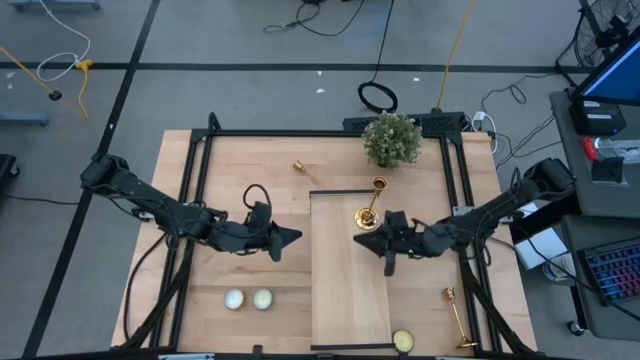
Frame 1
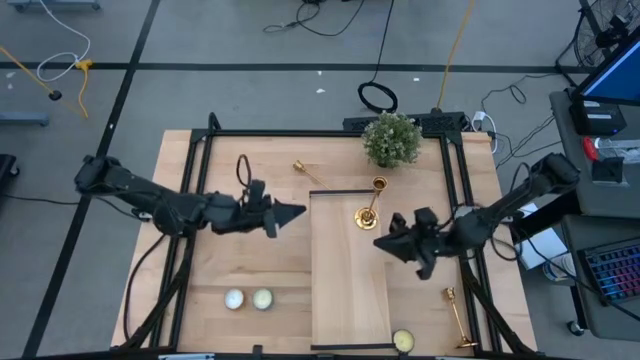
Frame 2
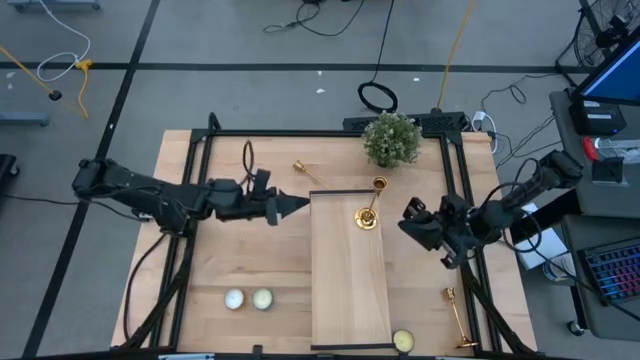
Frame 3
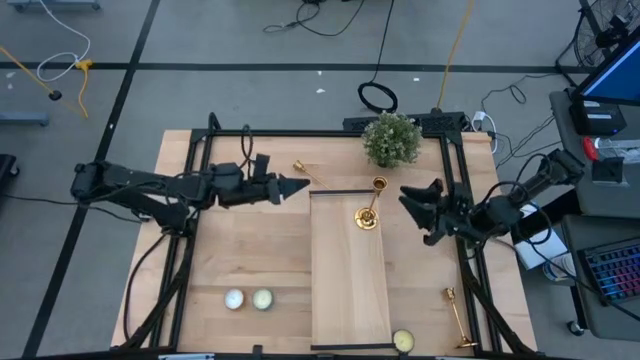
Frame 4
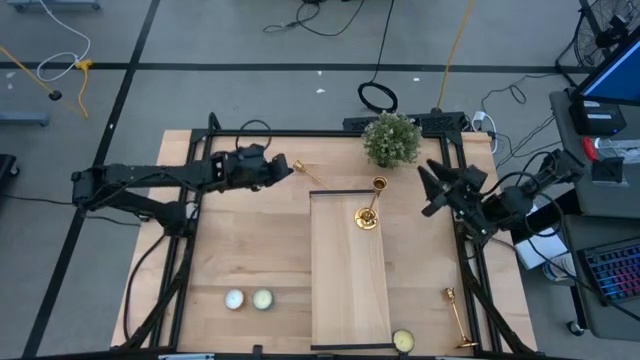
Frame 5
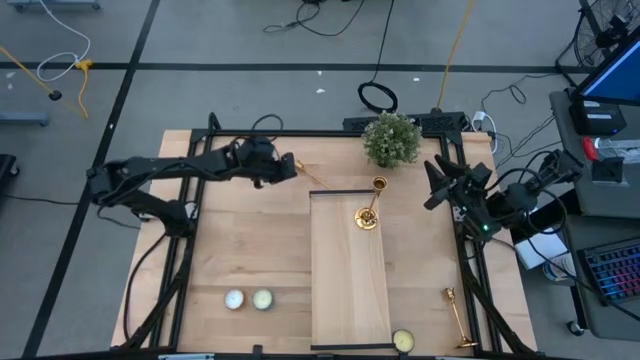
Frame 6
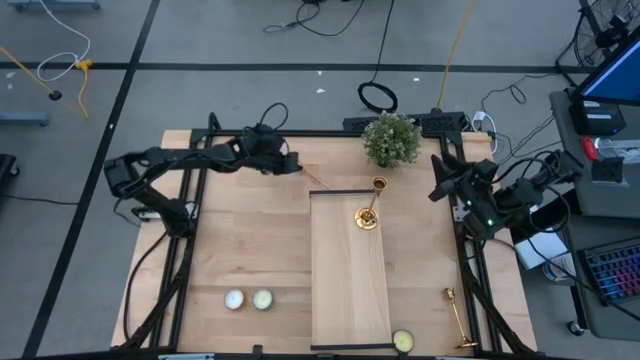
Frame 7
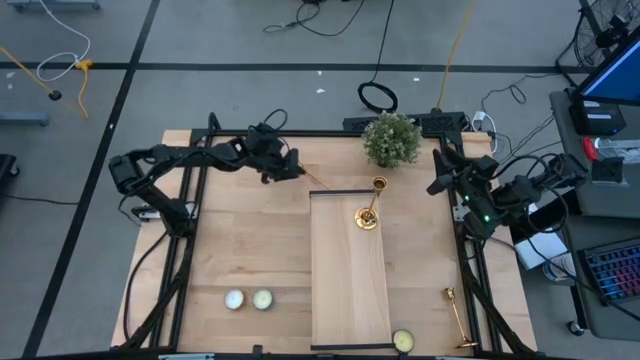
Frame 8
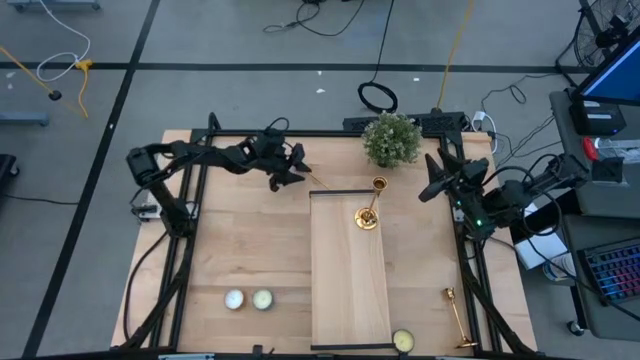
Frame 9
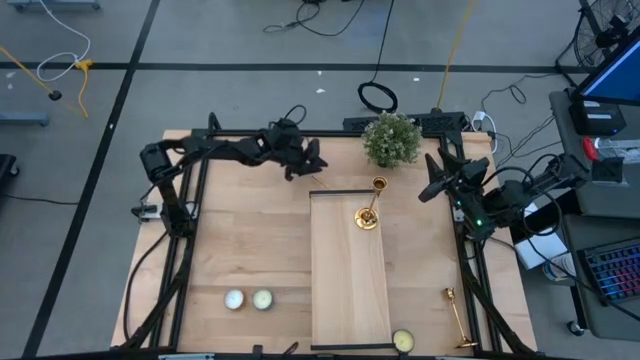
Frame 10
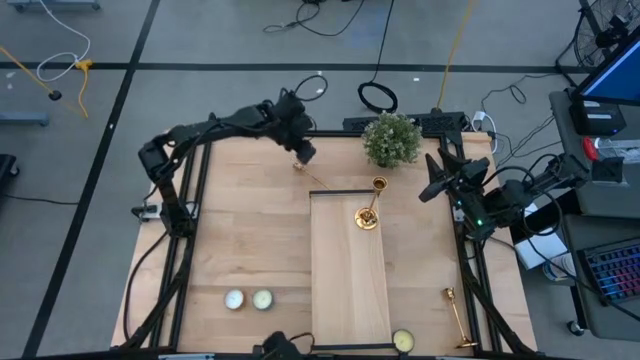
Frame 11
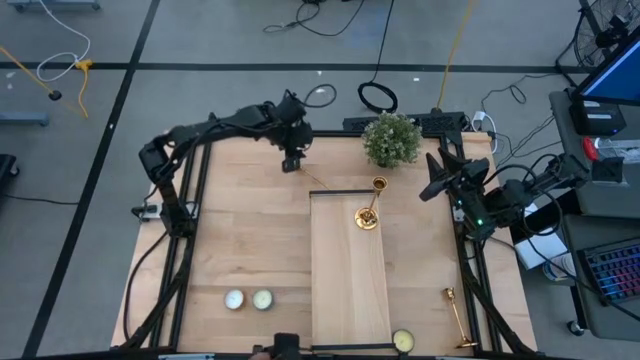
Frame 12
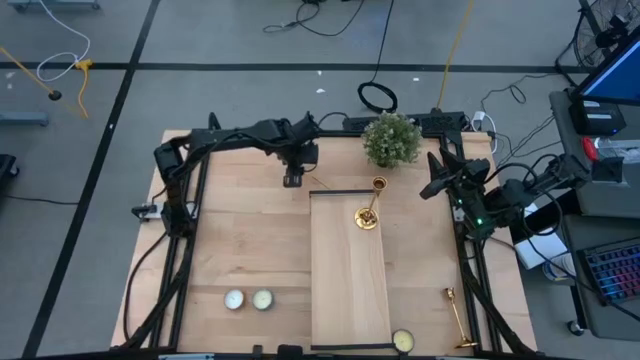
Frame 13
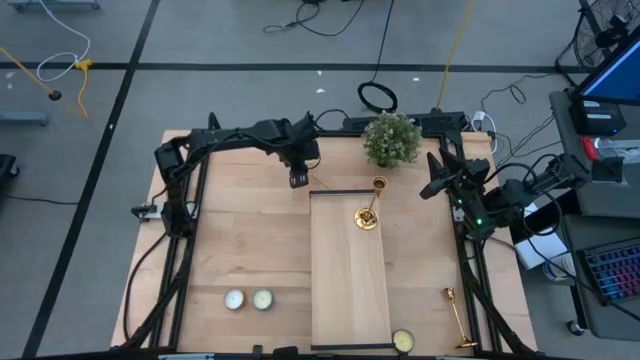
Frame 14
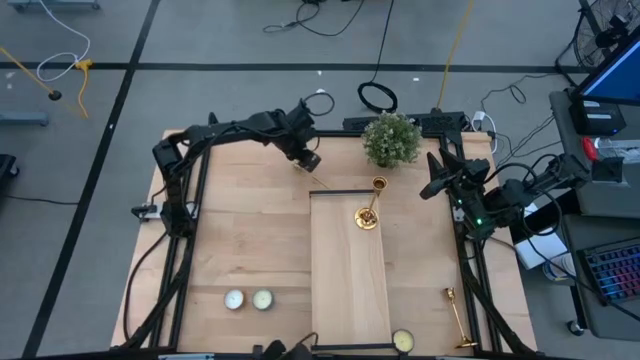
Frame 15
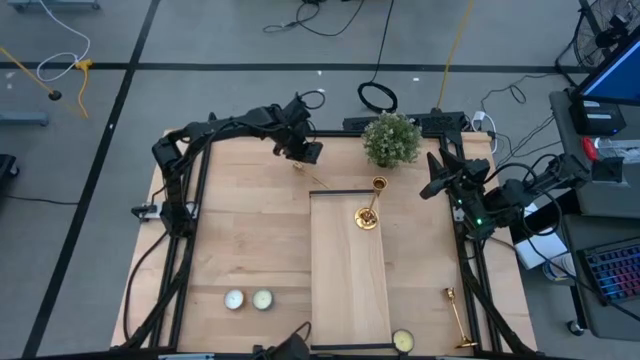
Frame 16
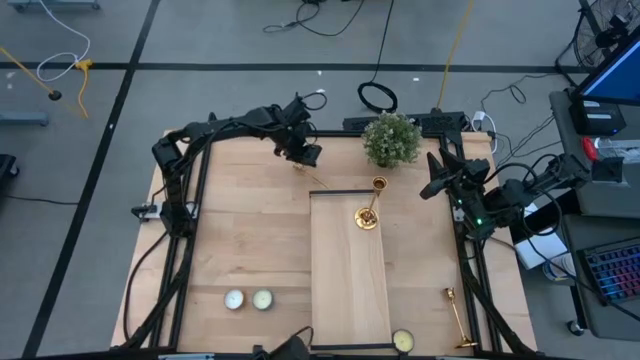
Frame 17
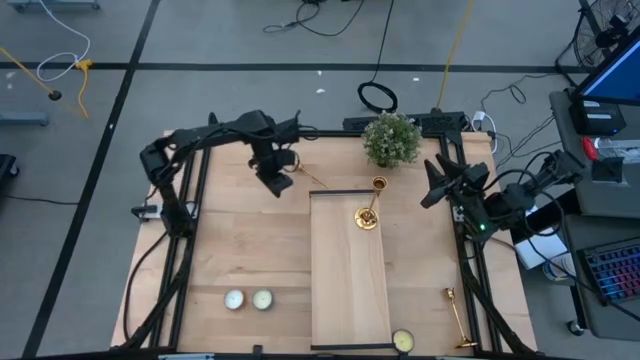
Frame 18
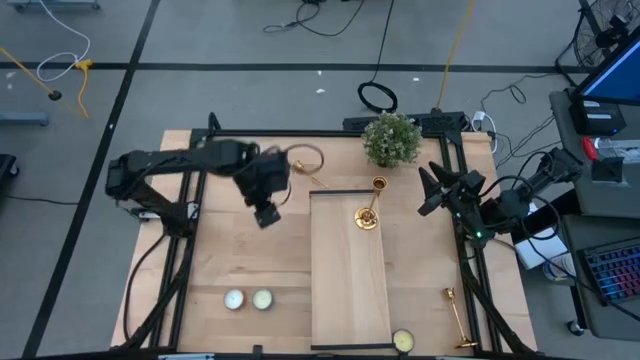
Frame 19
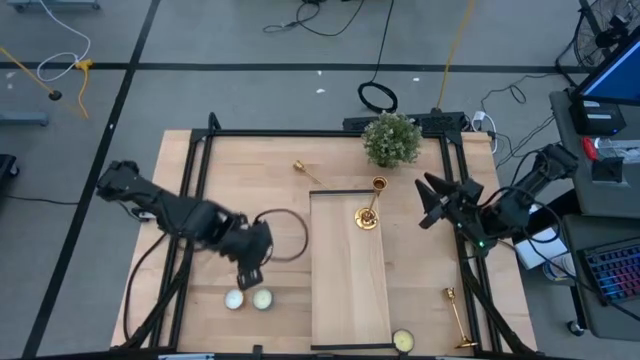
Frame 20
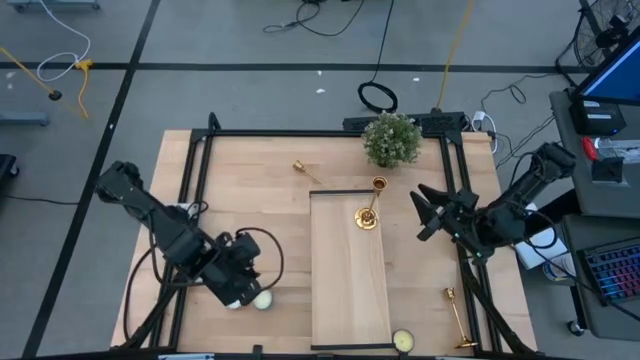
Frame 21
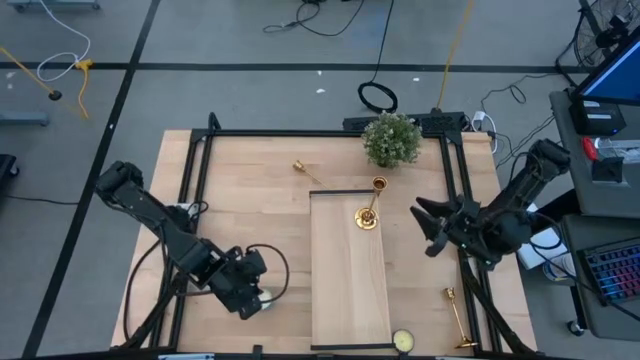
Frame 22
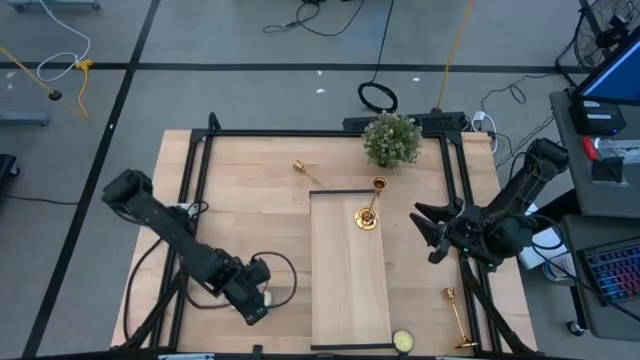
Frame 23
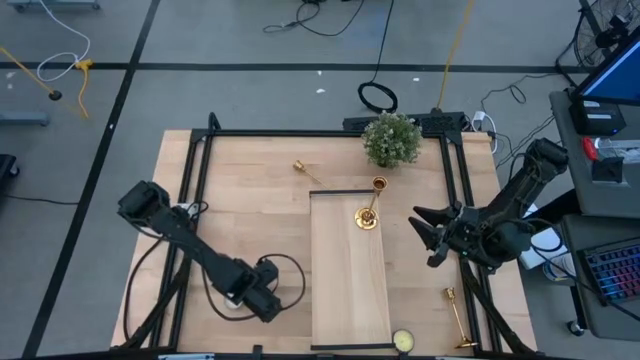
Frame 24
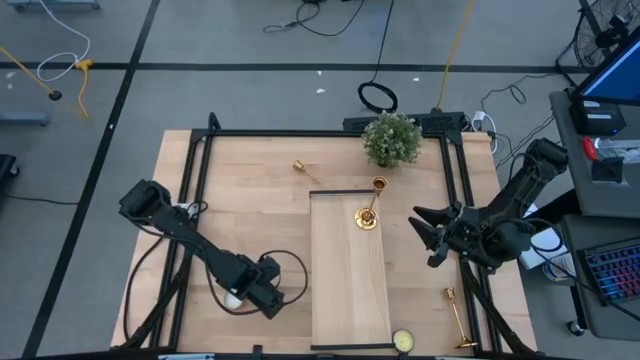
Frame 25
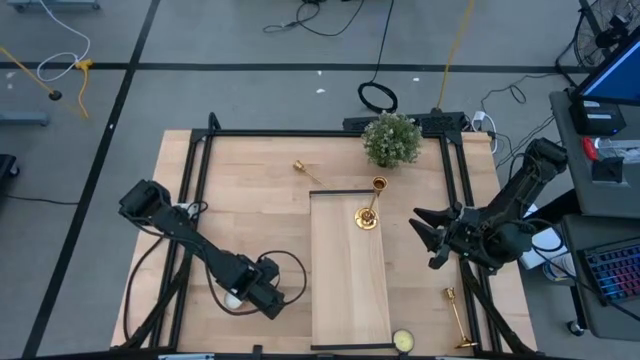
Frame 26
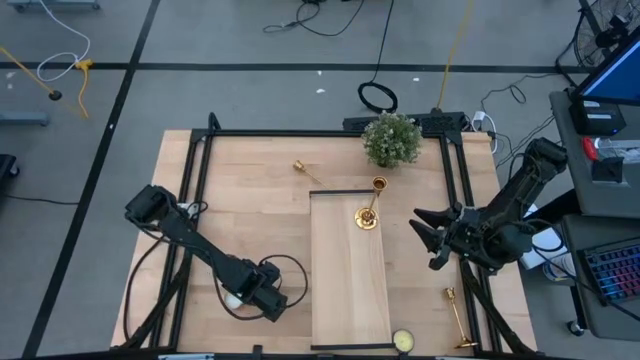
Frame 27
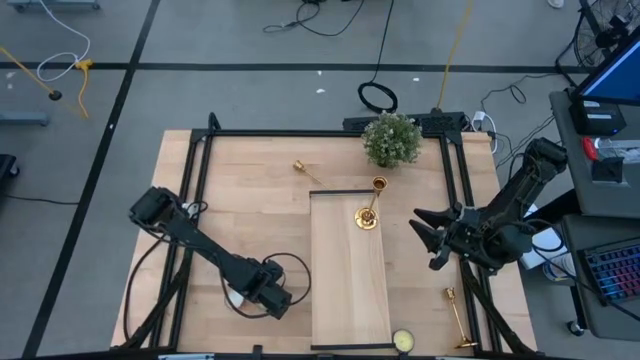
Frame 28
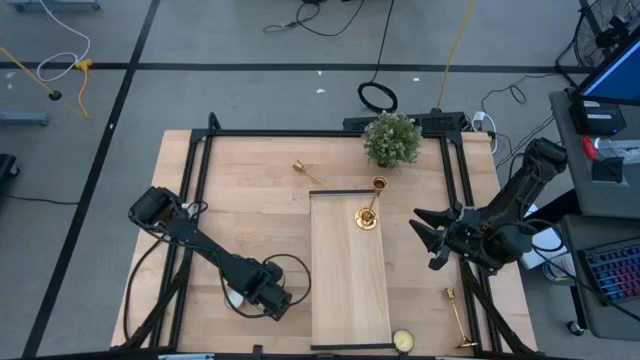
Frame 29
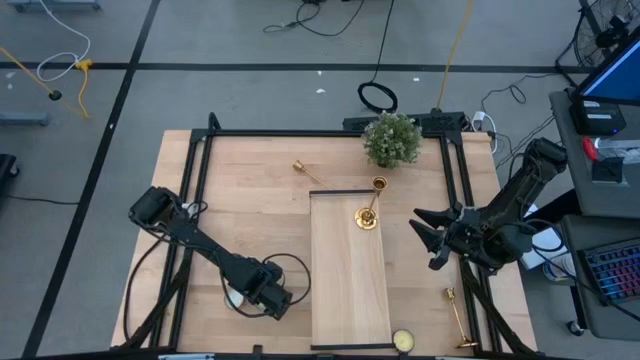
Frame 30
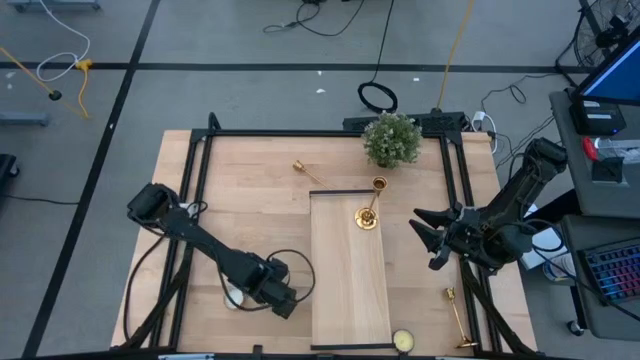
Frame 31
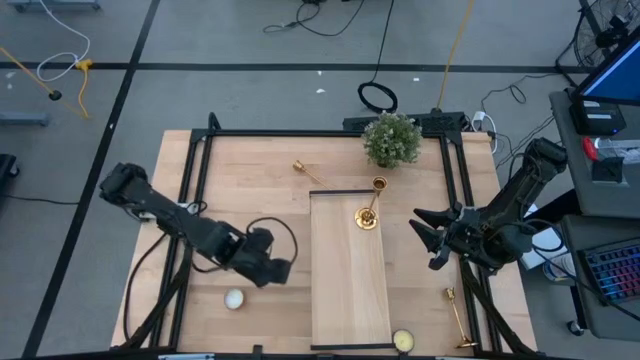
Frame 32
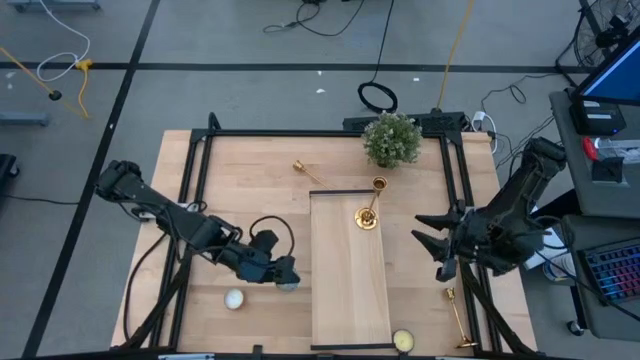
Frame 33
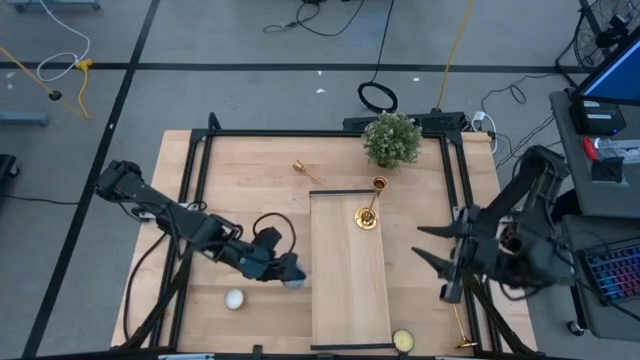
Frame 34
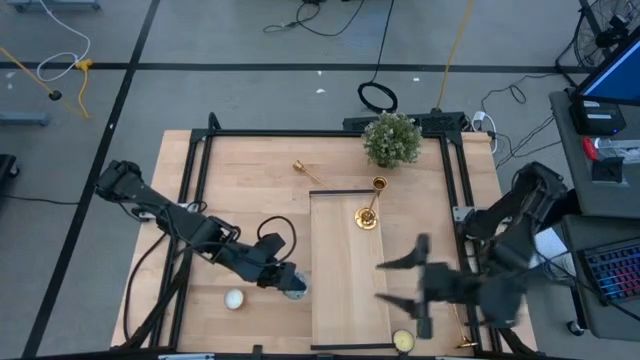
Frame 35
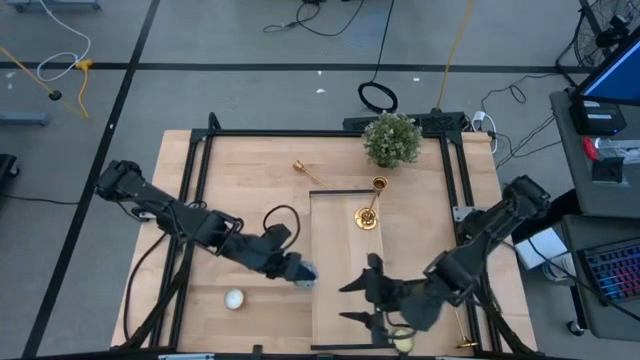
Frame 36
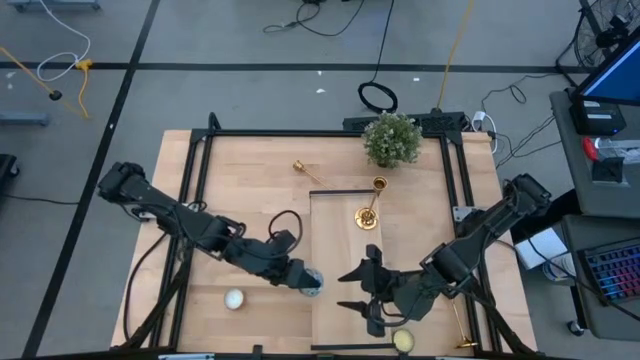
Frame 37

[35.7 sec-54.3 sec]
Task: Pick & Place candle stick holders
Put the blue patterned scented candle on the shelf

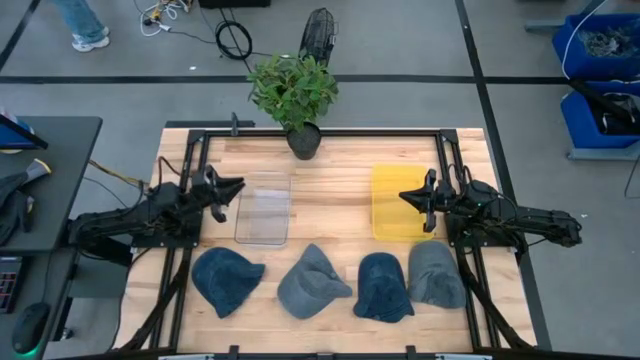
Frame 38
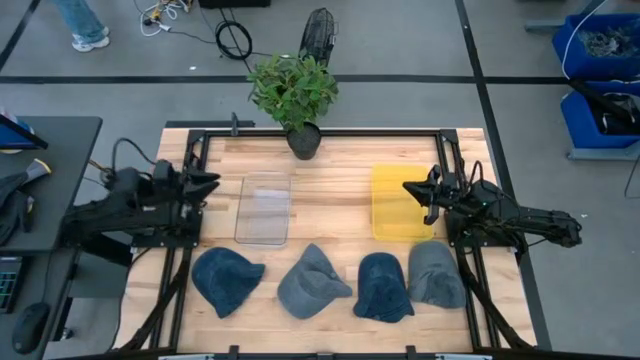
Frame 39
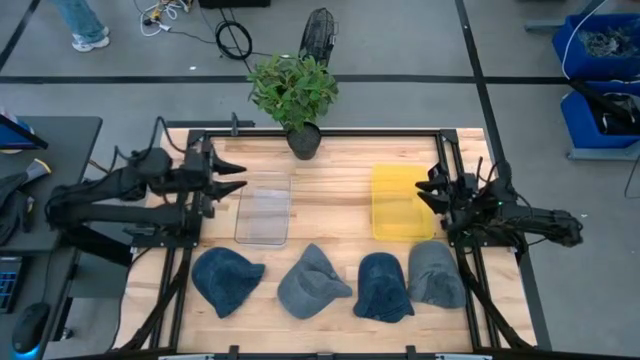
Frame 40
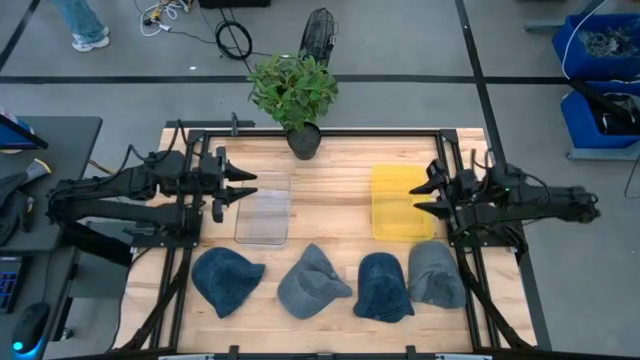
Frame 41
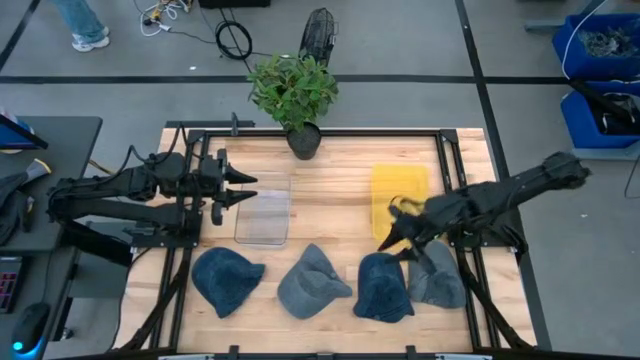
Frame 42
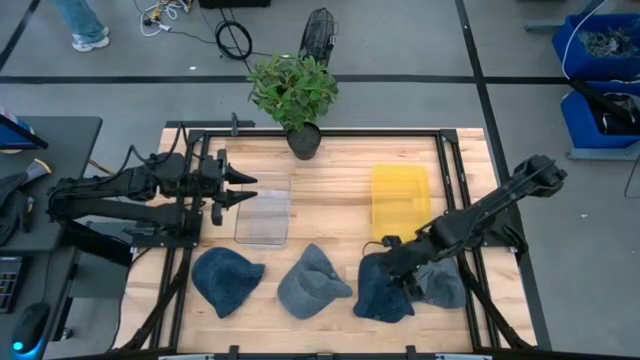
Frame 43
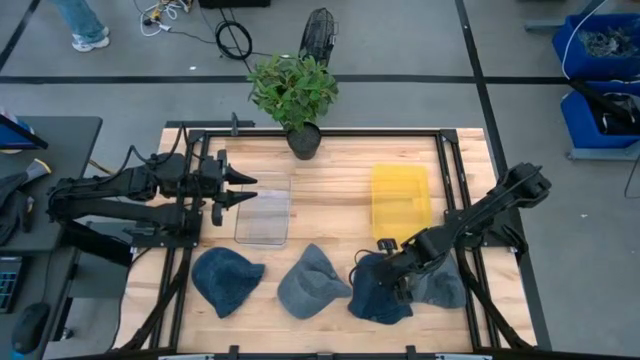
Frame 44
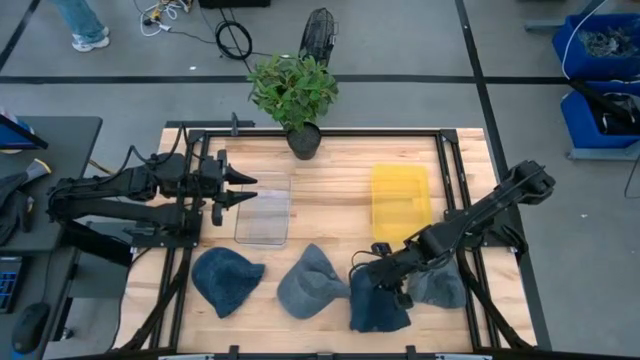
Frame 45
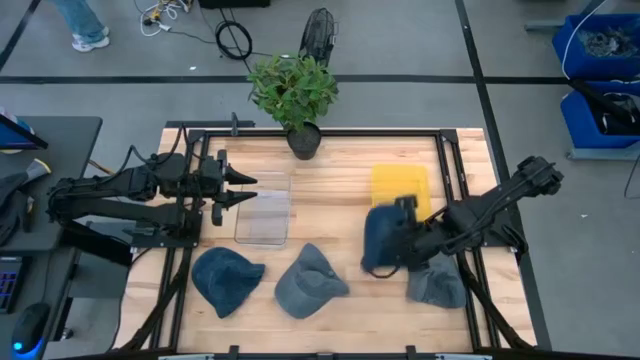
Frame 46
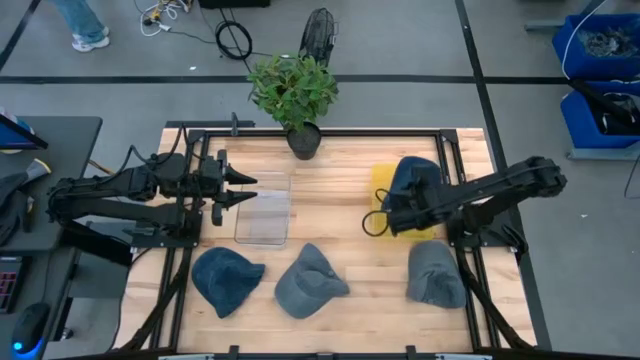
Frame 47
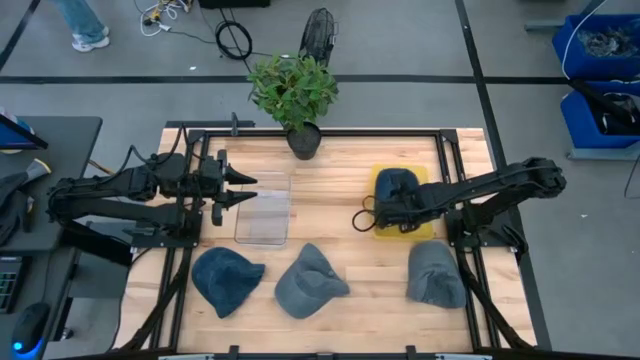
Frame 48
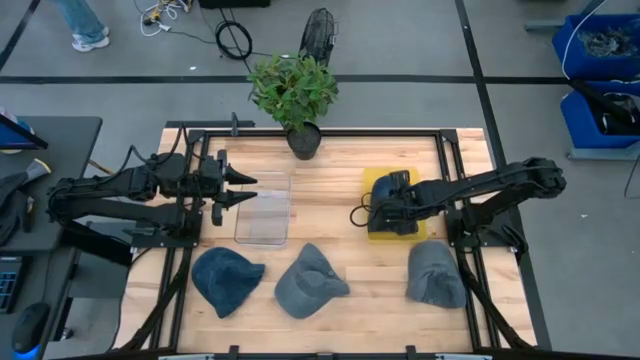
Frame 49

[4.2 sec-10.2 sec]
Task: Pick & Place hat
Put the blue cap into the yellow bin
